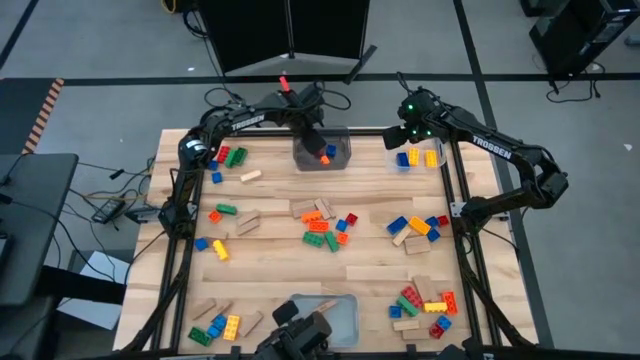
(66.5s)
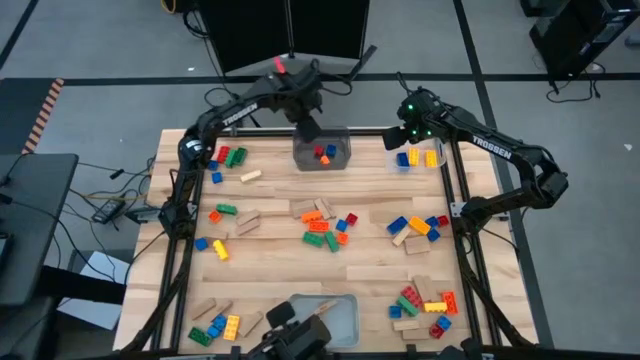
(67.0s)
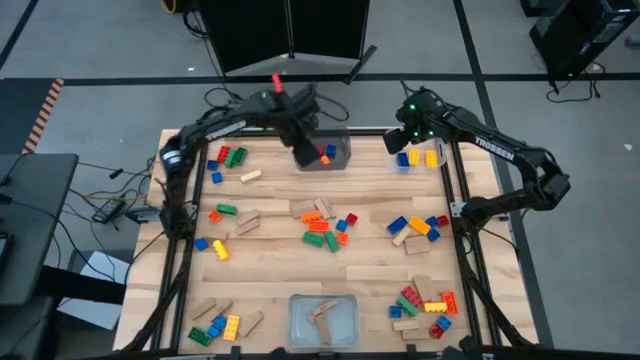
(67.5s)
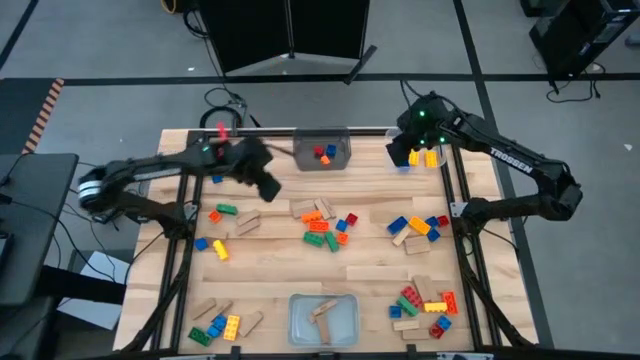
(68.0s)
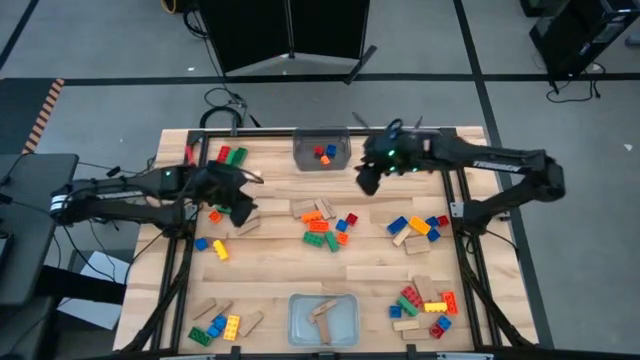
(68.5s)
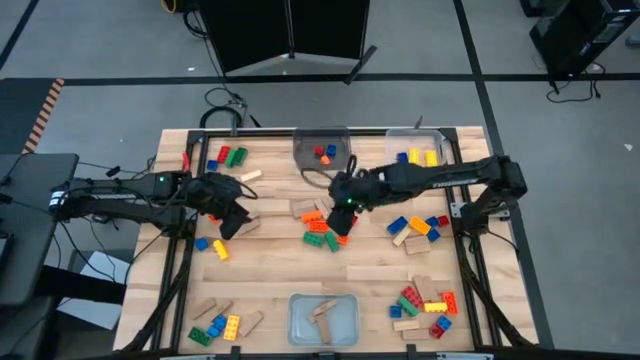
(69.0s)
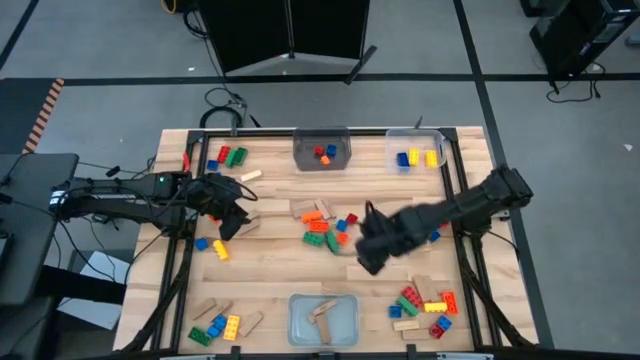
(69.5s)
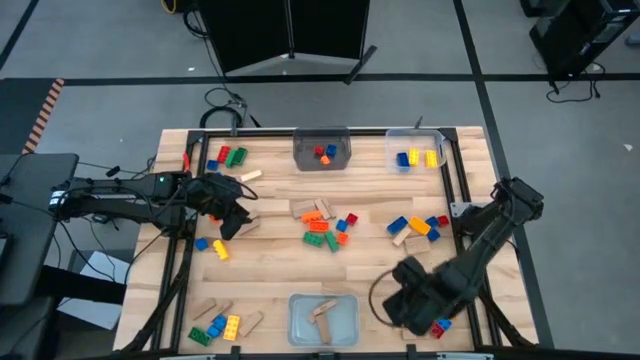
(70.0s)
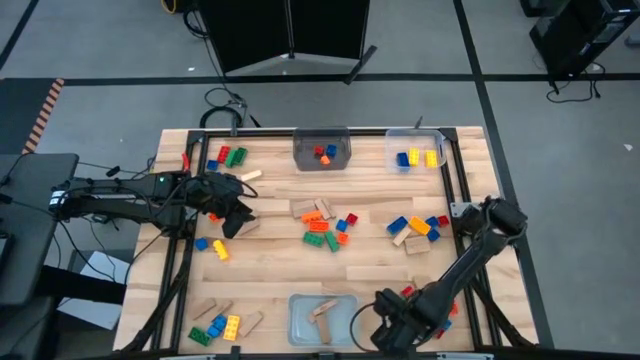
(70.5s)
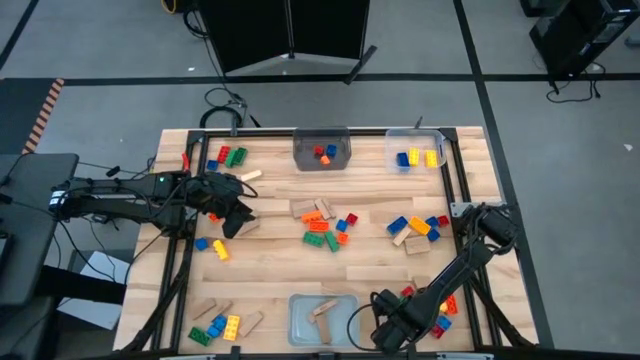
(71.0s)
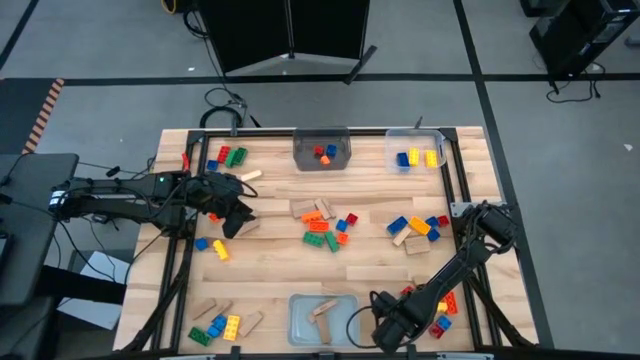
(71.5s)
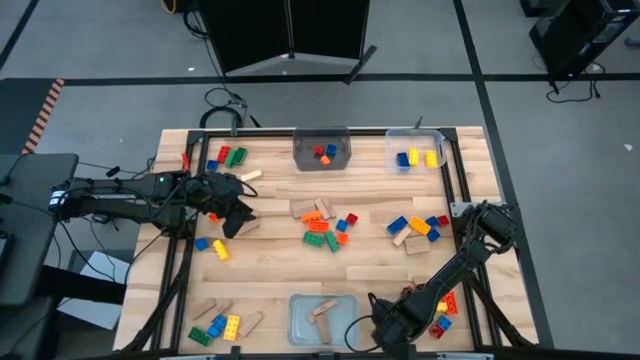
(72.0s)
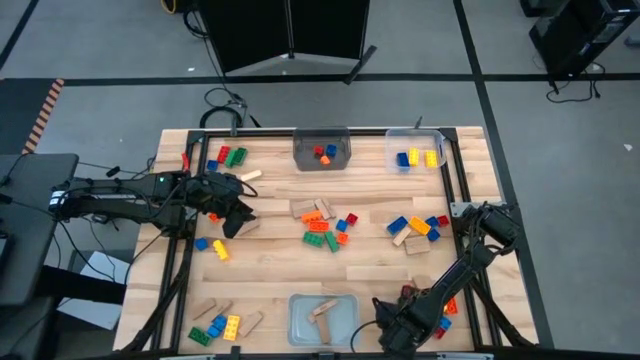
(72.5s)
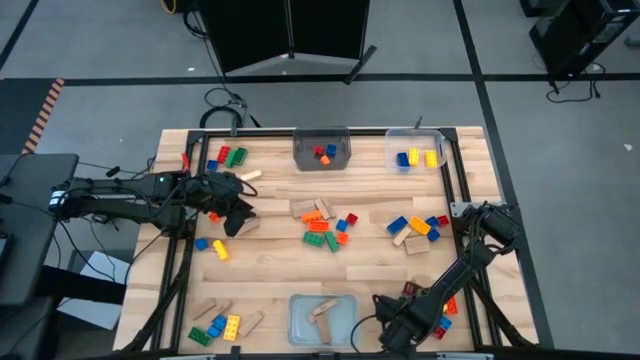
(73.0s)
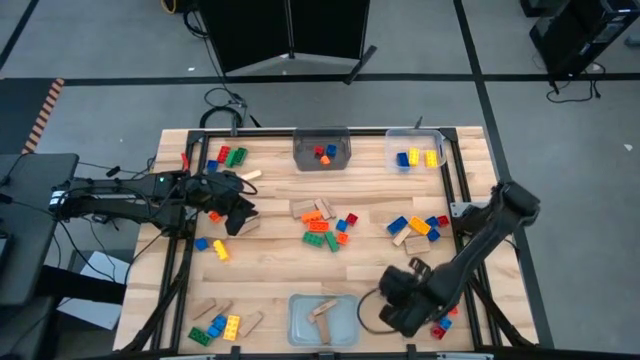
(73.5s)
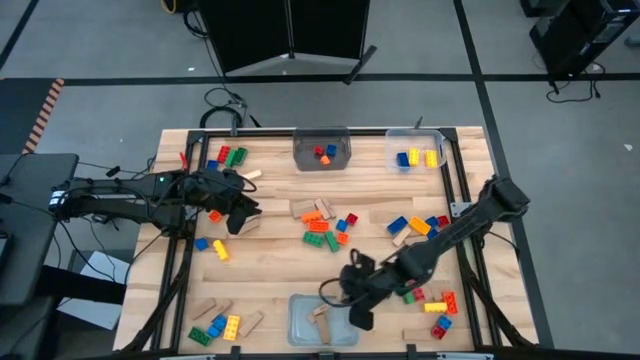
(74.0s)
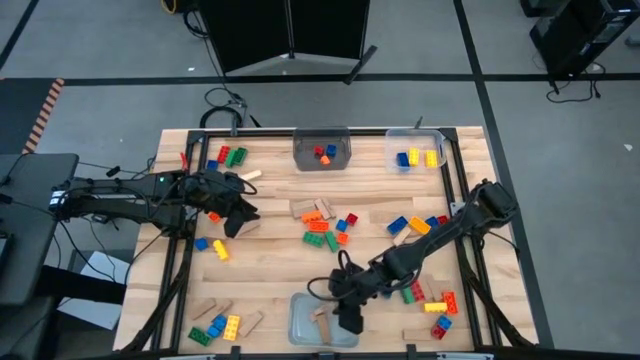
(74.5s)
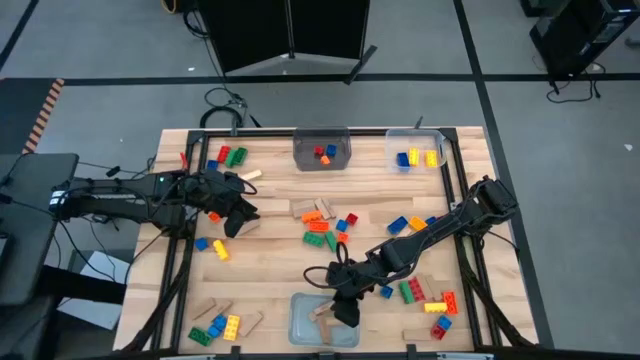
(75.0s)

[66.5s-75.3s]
Task: Sort blocks by size
Put the brown block into the gray bin

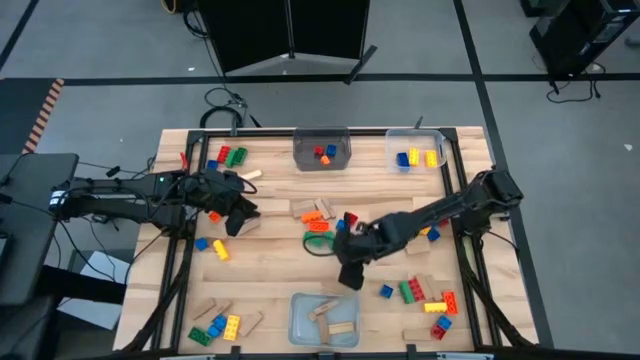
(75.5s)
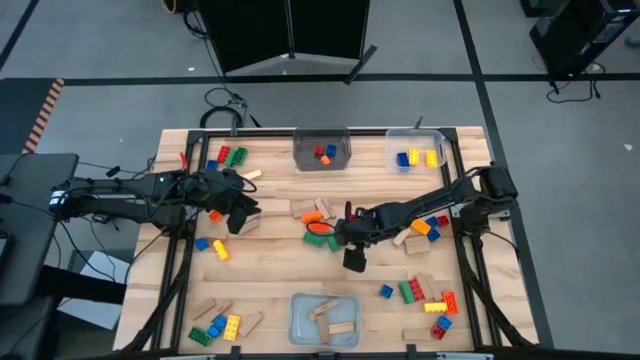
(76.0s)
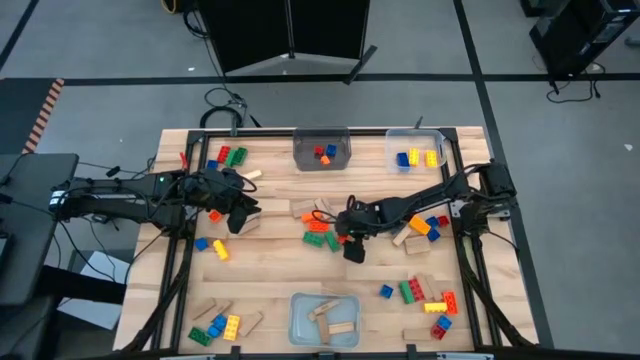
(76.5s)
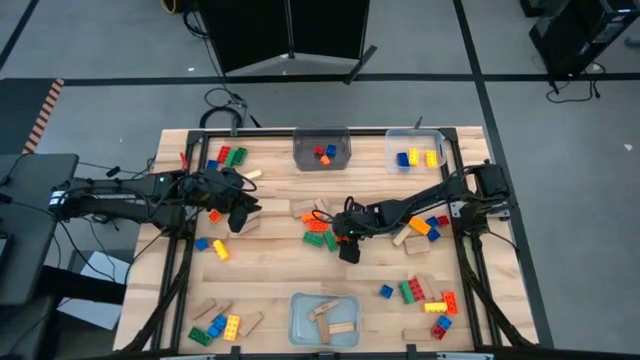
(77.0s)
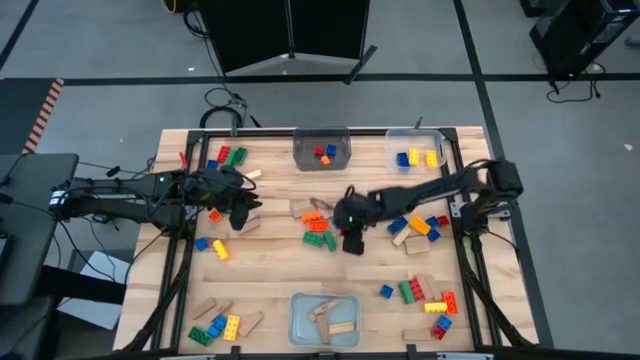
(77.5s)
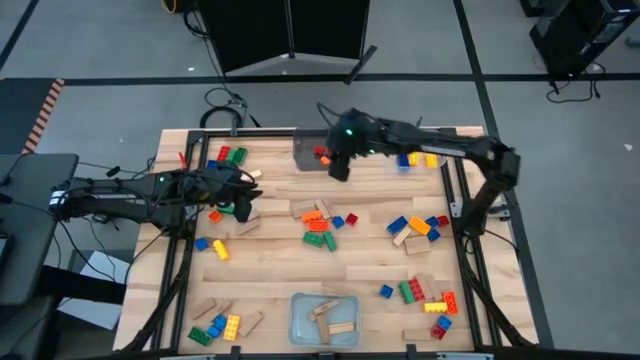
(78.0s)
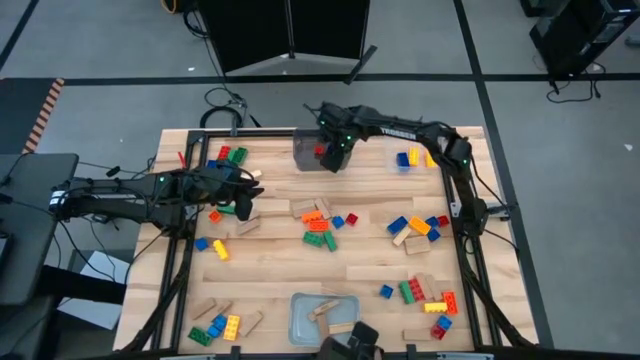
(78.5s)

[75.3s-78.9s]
Put the small orange game piece into the black bin

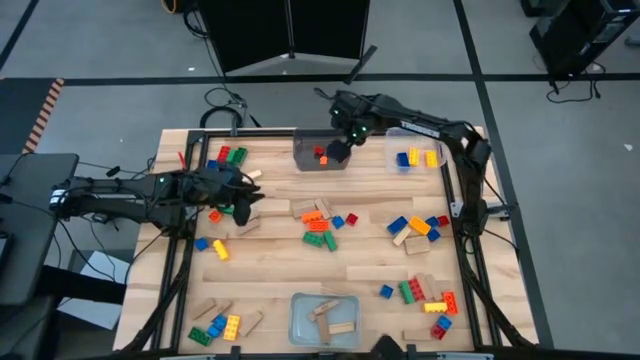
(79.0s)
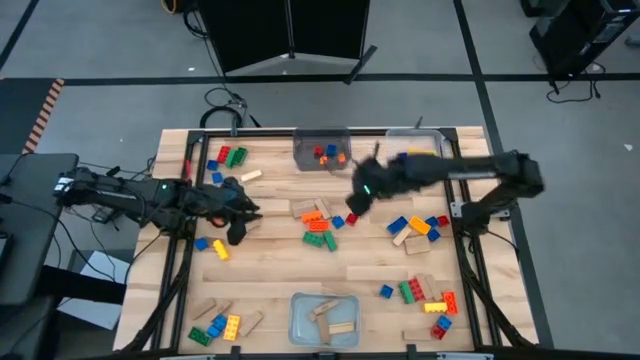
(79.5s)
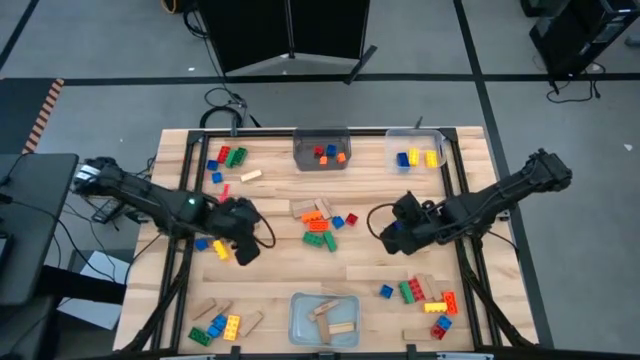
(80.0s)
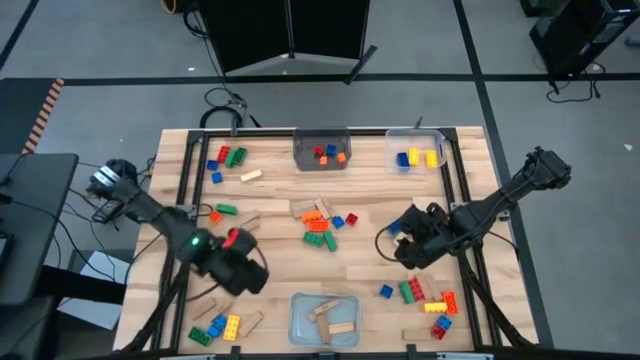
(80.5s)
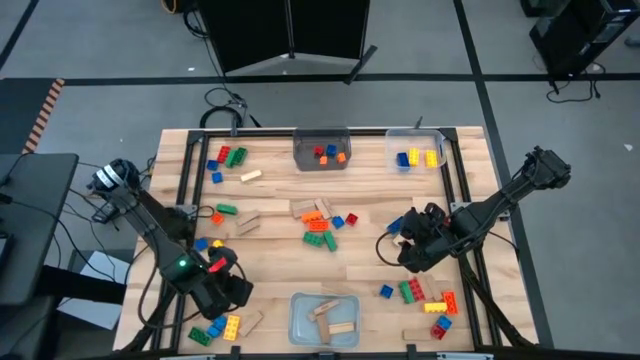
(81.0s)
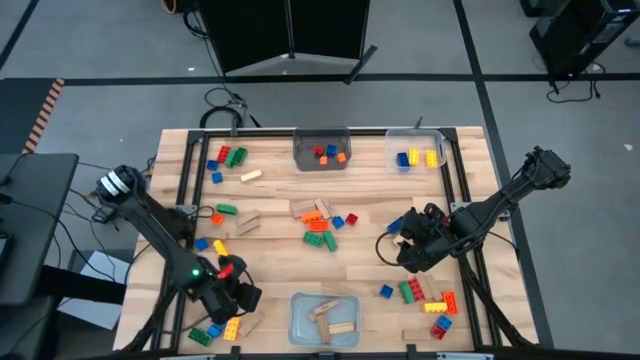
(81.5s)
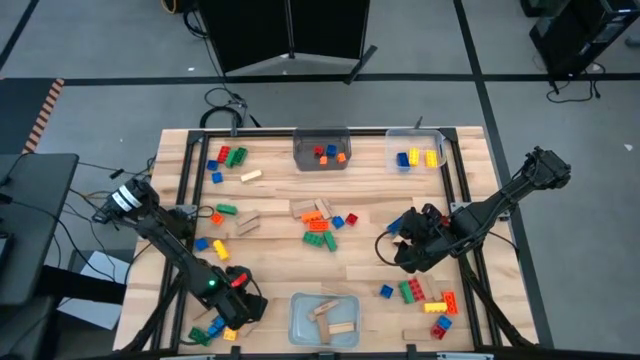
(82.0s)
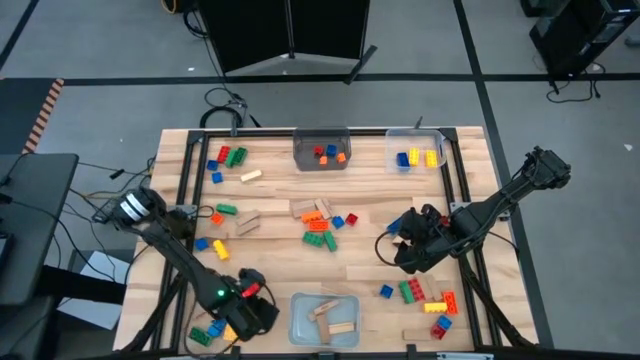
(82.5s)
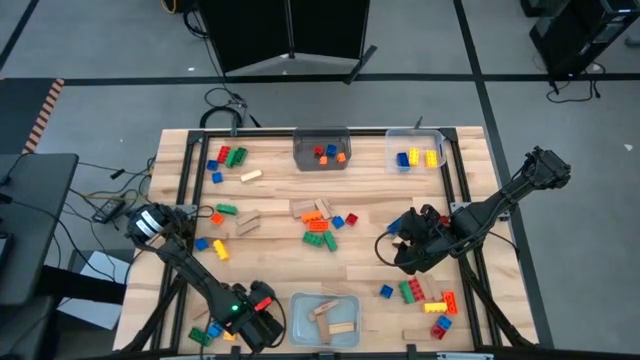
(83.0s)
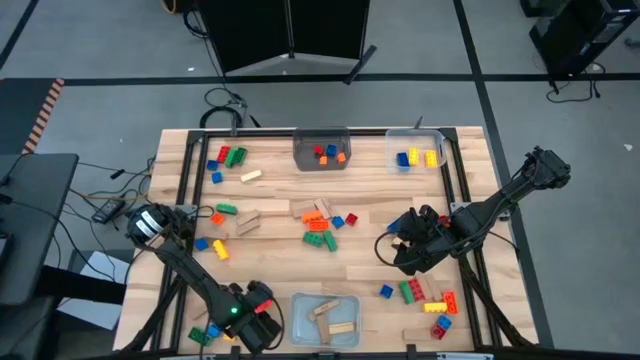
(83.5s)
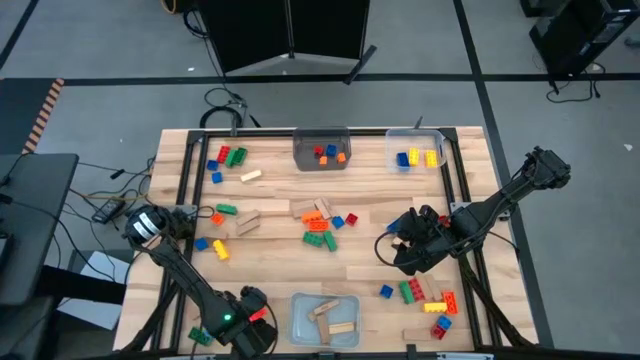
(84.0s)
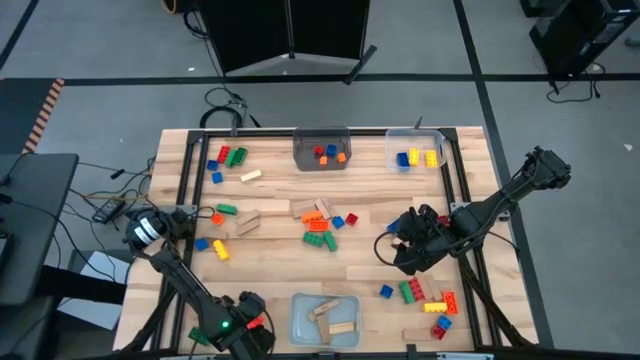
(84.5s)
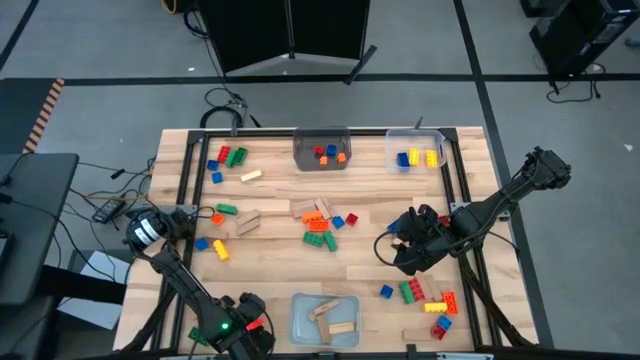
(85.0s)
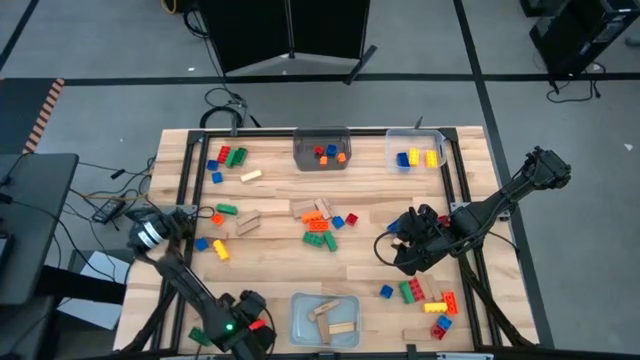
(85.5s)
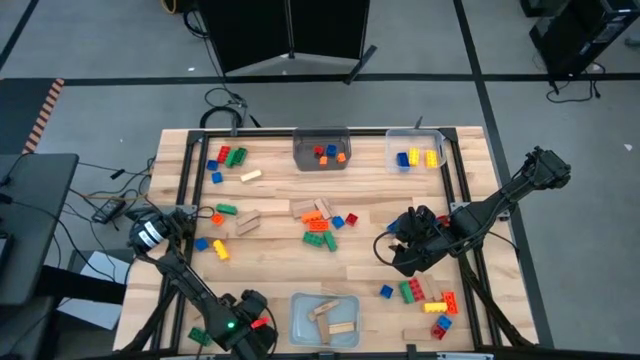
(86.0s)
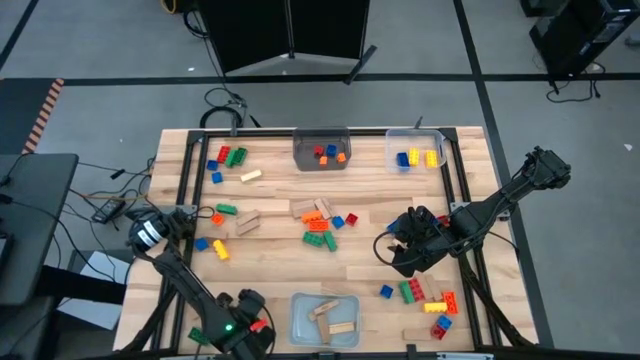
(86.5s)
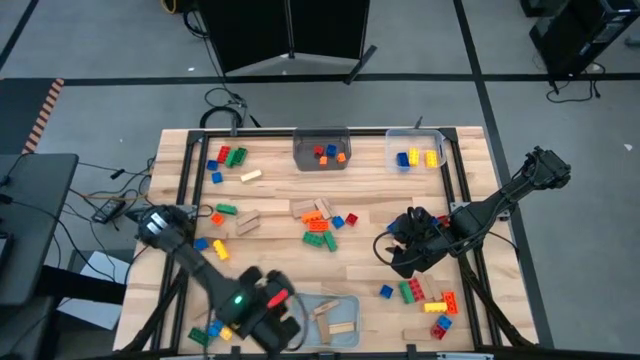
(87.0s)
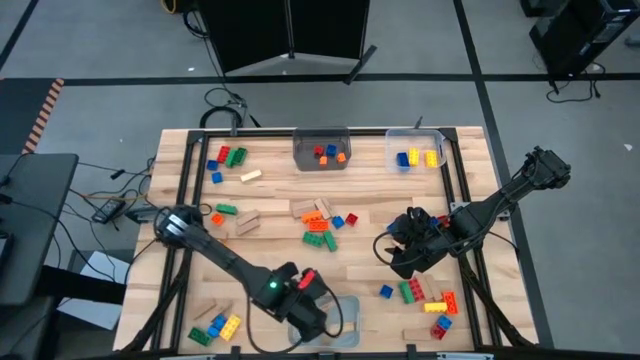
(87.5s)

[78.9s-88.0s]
Put the brown block into the gray bin
